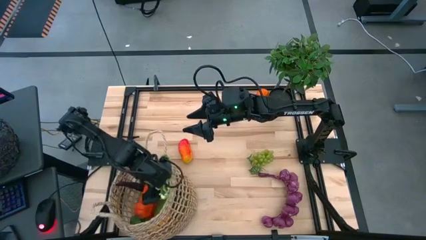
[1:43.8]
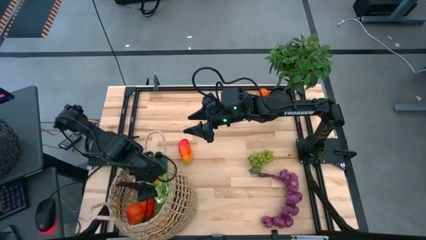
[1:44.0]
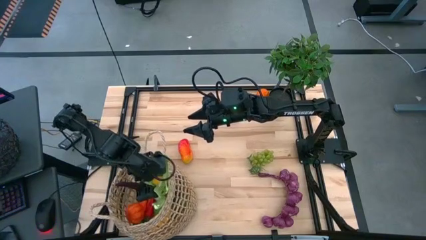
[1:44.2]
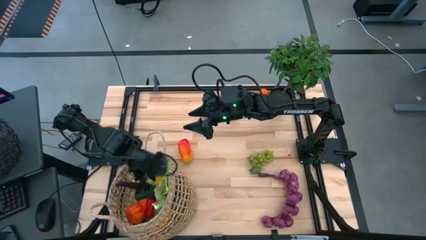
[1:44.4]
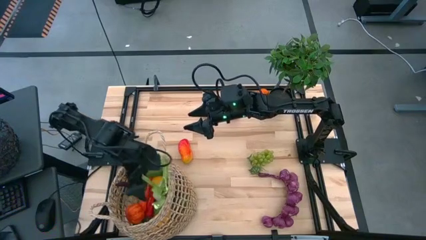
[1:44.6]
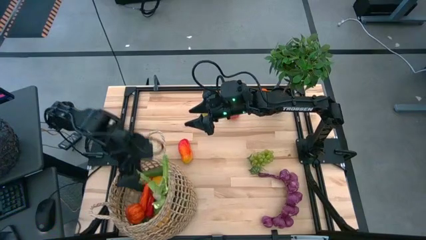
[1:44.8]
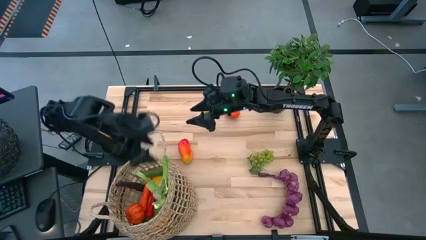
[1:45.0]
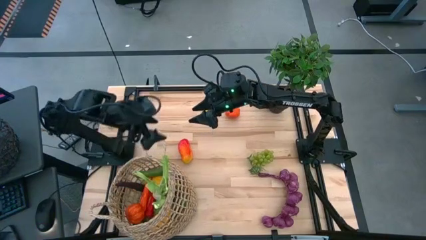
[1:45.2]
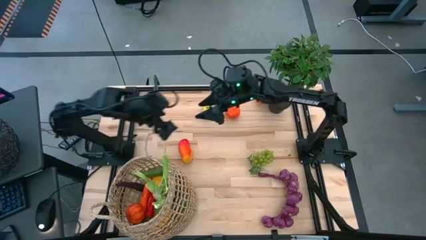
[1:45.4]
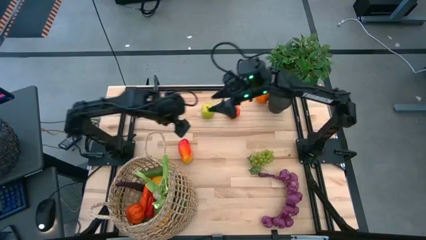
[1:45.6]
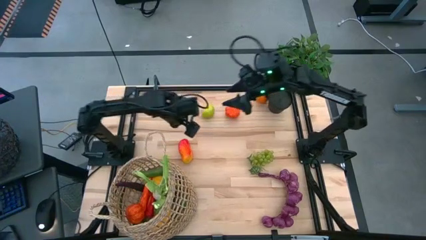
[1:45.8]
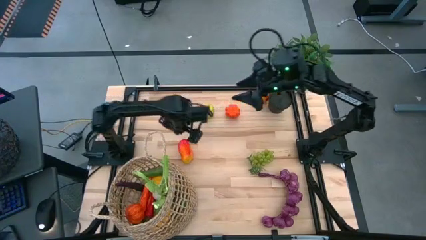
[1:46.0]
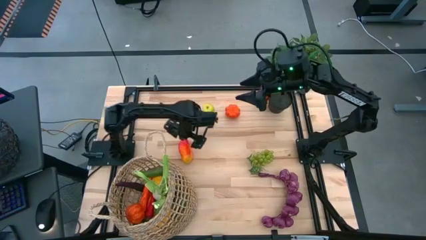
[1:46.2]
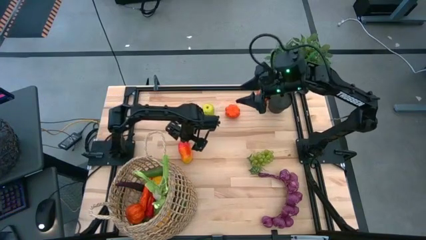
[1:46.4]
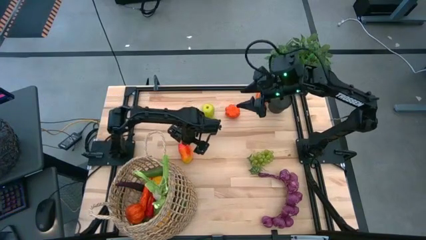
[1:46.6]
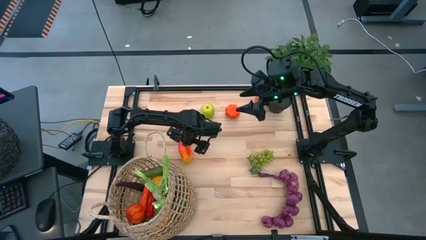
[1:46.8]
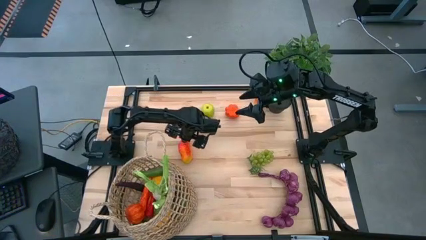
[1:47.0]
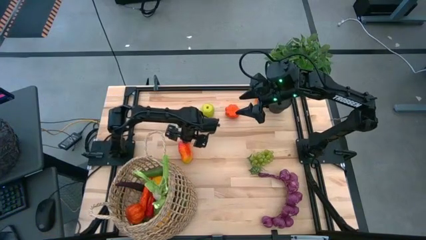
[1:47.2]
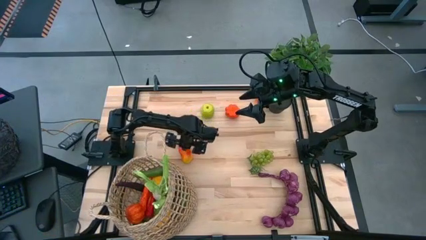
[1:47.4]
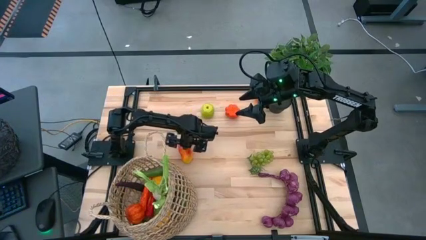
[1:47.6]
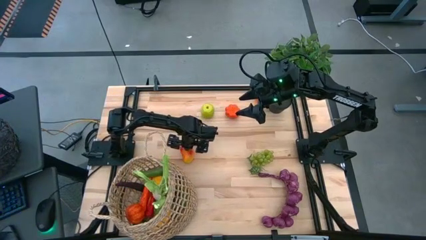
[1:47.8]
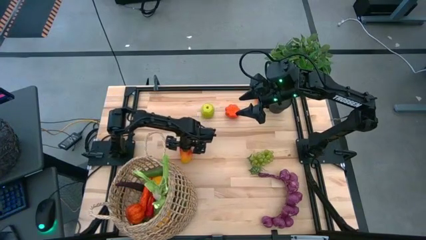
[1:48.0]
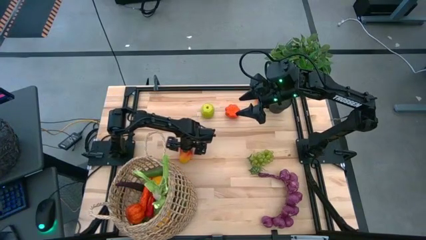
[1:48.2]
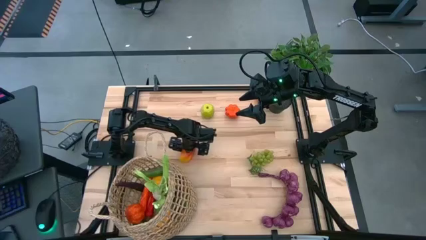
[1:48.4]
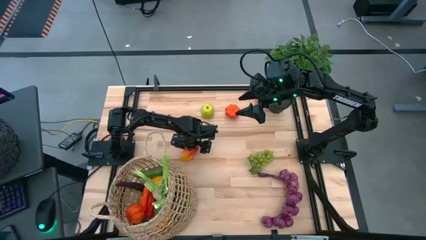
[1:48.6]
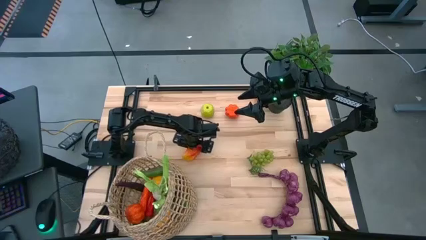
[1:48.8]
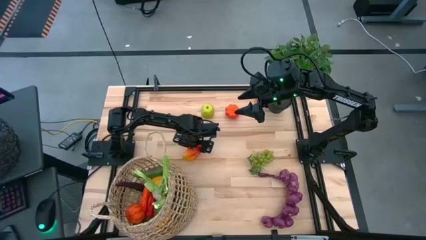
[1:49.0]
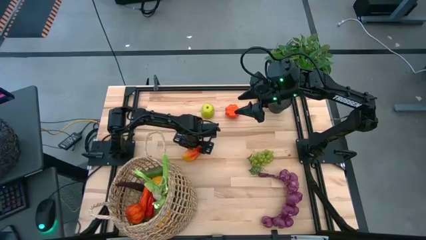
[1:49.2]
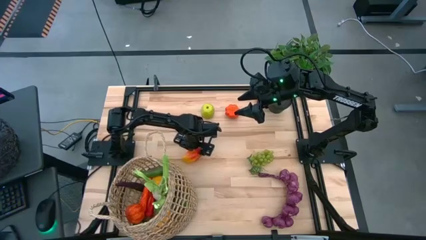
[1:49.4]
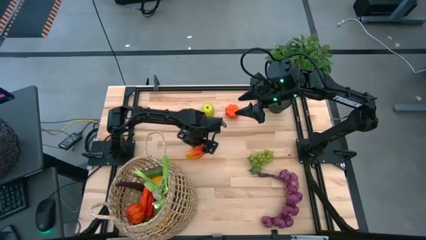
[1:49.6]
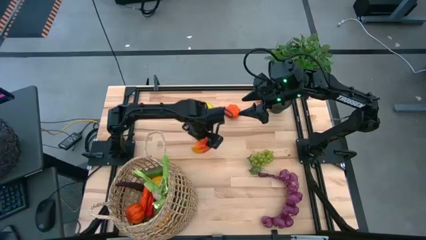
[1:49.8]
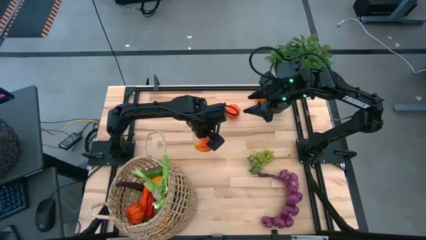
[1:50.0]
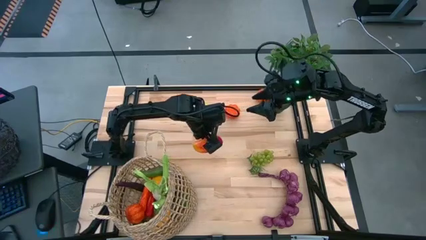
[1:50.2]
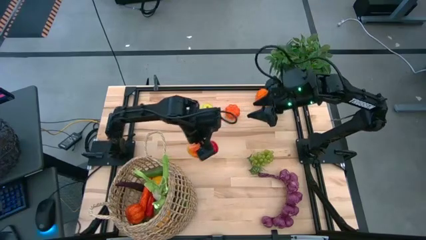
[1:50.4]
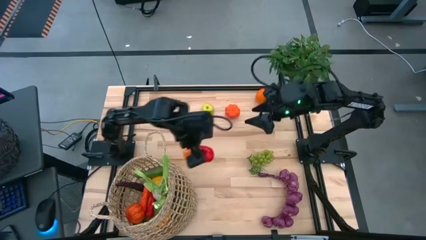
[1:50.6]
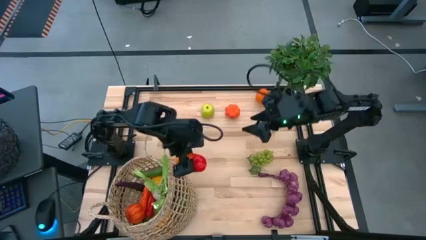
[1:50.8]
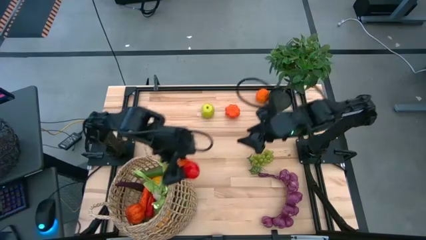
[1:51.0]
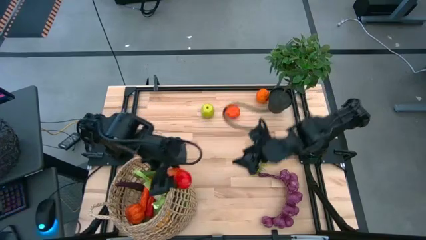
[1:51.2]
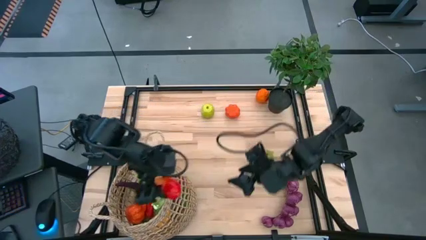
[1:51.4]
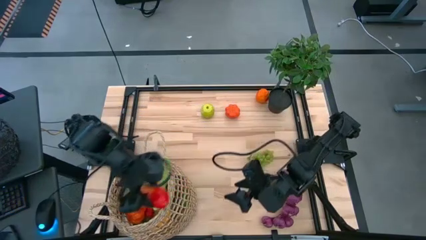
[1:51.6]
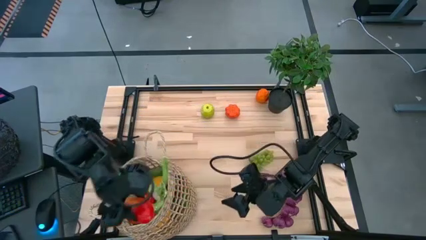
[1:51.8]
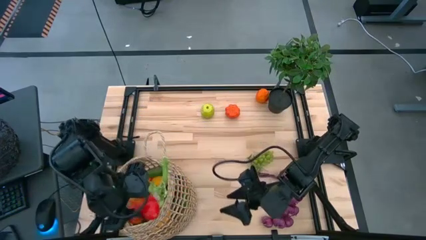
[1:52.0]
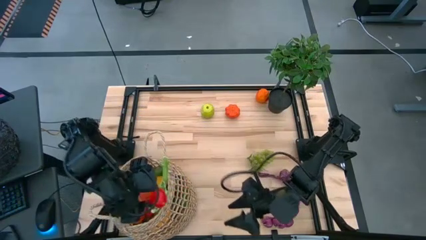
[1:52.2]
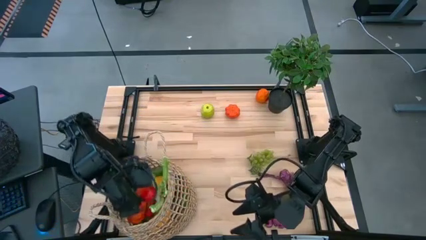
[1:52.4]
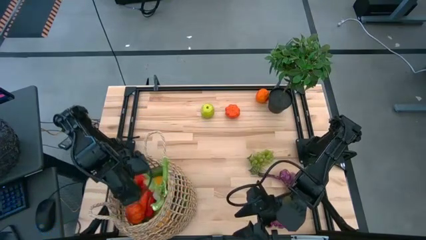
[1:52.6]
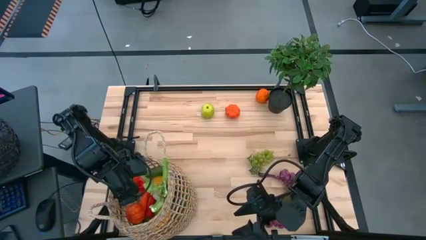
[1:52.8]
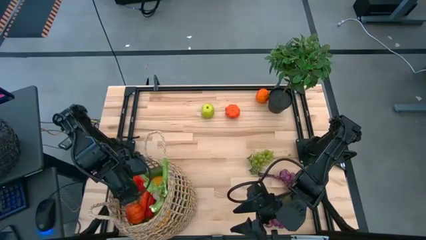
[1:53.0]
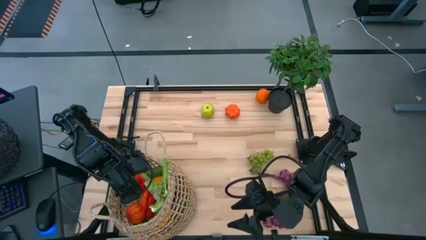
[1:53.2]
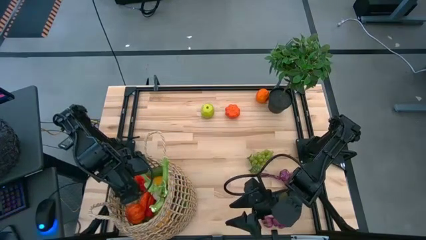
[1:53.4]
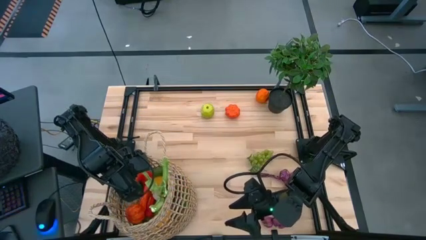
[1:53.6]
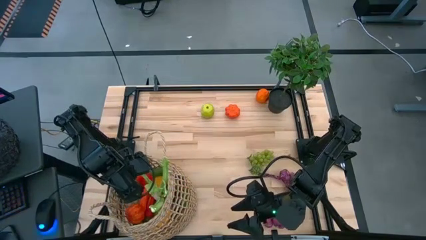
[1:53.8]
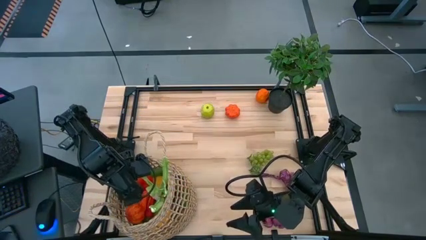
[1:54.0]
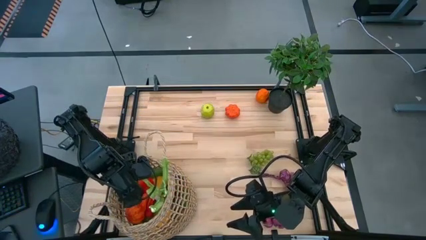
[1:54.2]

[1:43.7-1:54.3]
Task: Build produce basket
Put the mango into the basket

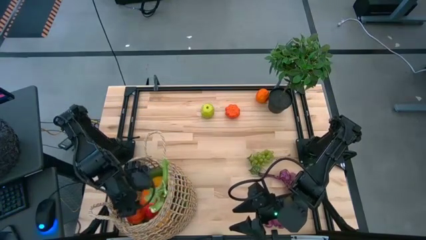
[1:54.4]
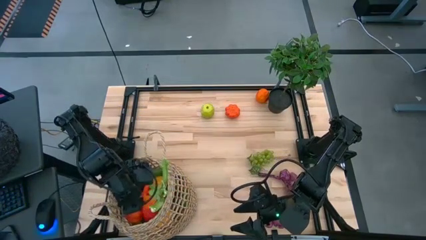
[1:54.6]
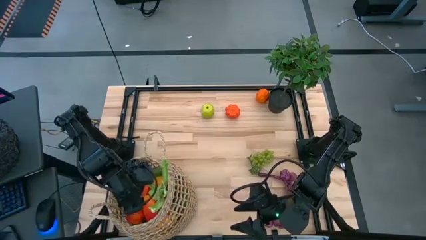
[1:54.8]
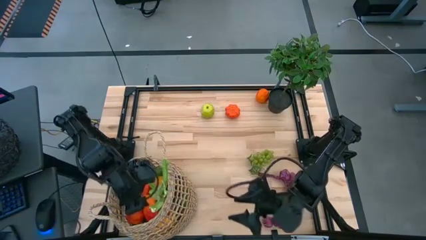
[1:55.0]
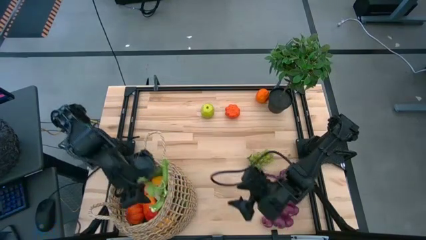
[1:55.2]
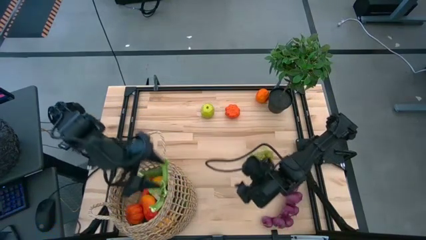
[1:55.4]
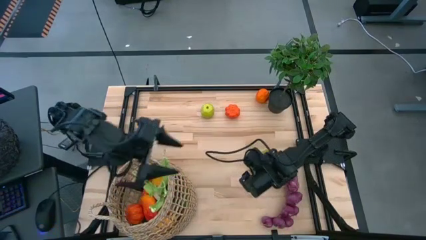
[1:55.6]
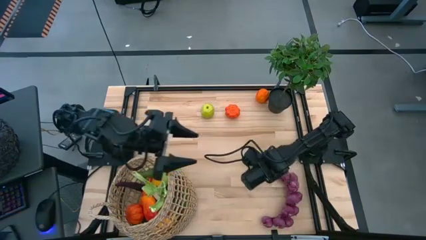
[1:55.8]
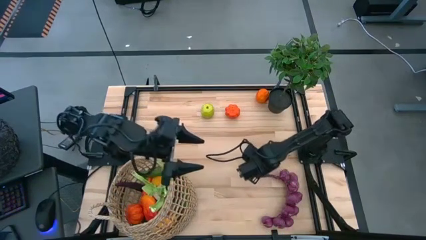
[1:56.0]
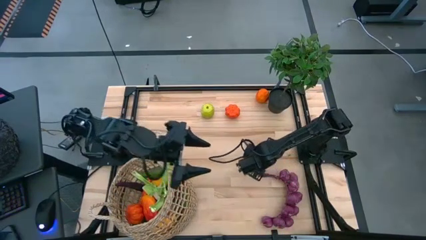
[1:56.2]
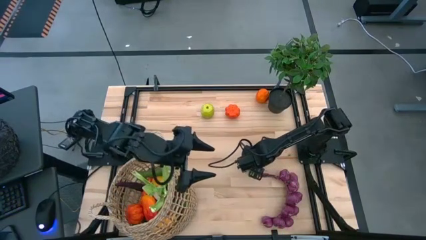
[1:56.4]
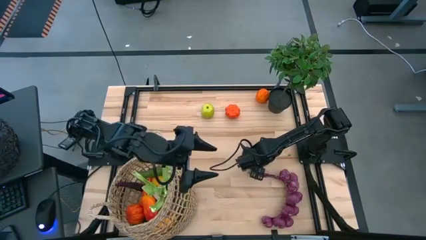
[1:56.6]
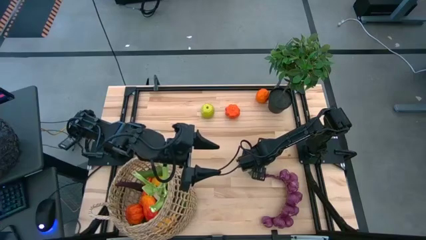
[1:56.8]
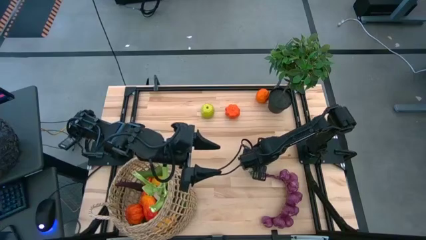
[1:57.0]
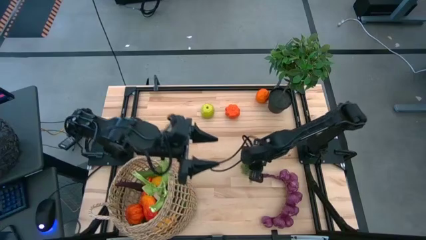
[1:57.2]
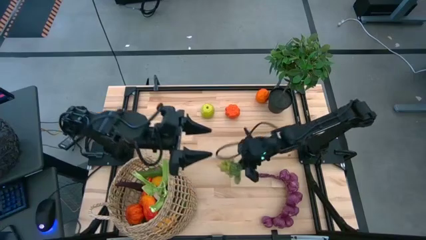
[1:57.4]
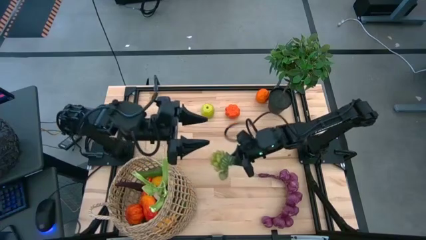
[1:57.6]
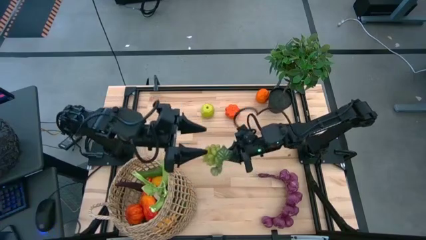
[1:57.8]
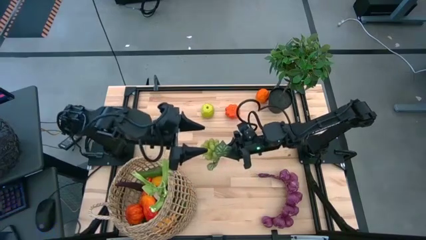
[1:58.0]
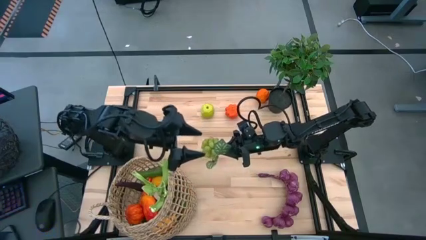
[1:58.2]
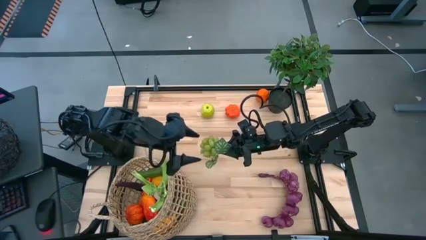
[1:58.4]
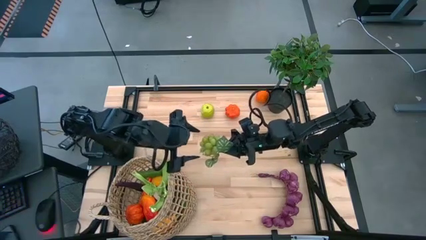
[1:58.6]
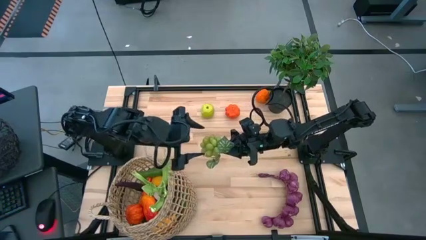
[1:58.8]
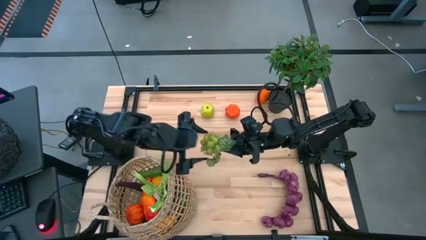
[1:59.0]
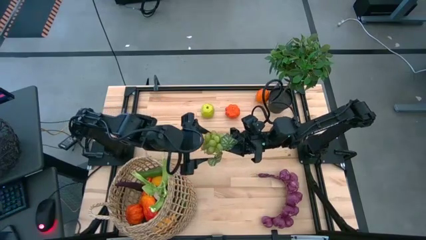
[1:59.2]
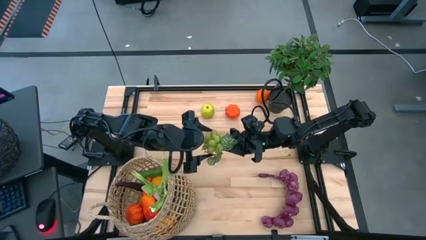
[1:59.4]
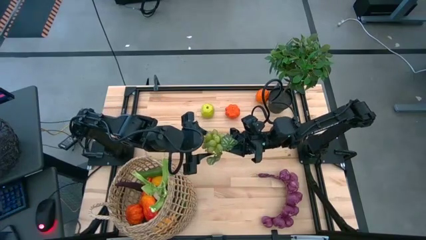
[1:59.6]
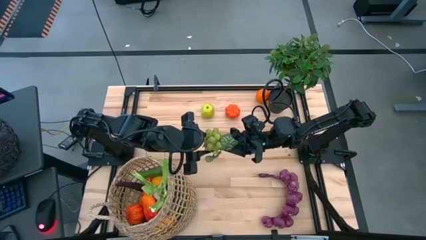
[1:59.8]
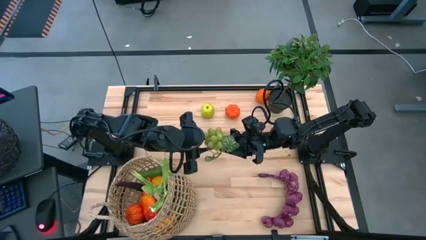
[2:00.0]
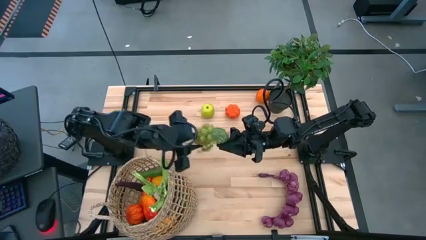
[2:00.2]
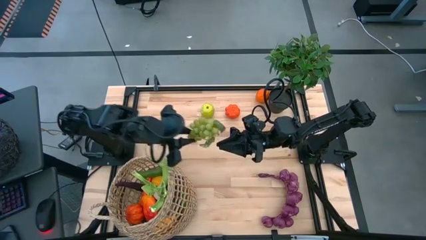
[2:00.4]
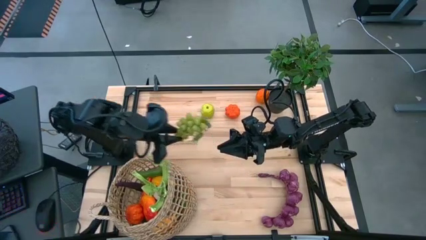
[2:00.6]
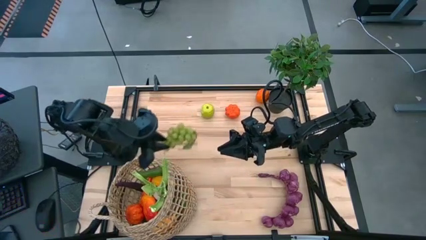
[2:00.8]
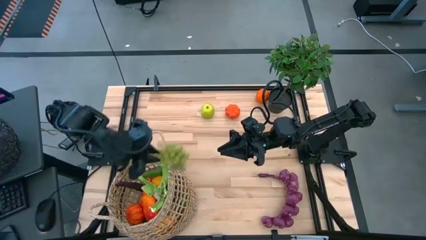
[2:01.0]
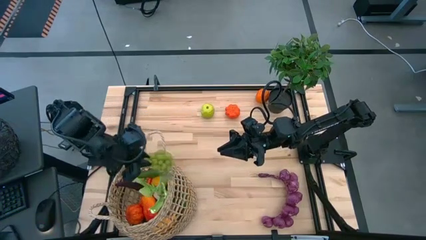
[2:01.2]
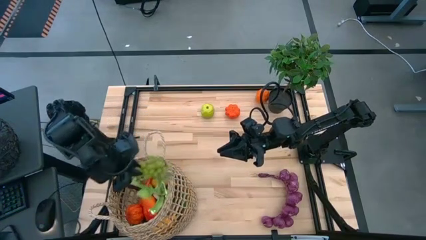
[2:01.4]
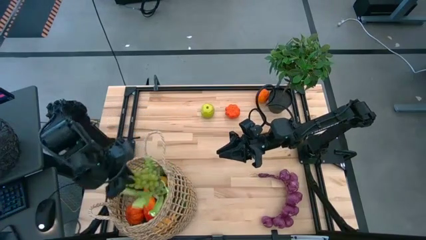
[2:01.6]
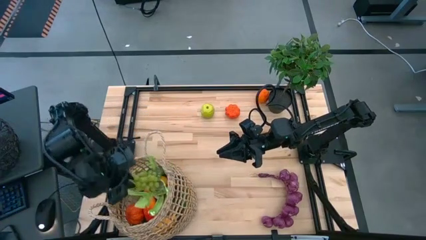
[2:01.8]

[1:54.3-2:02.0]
Put the grapes into the basket
